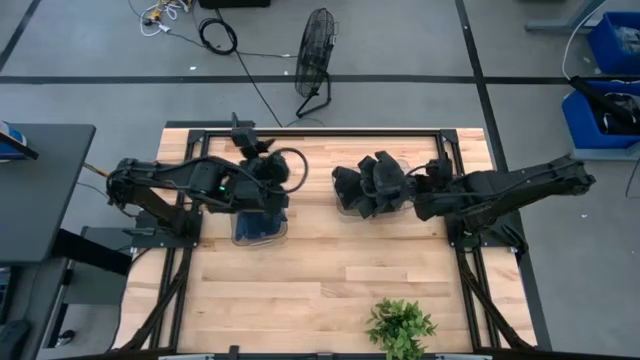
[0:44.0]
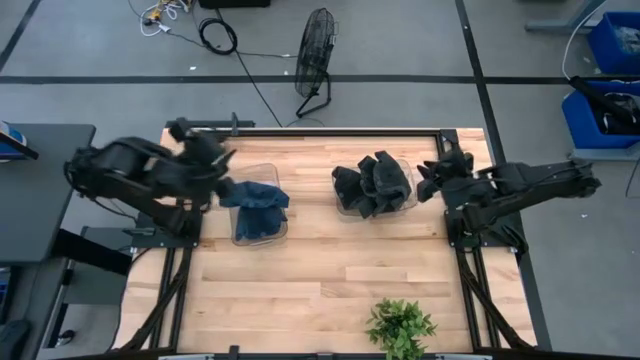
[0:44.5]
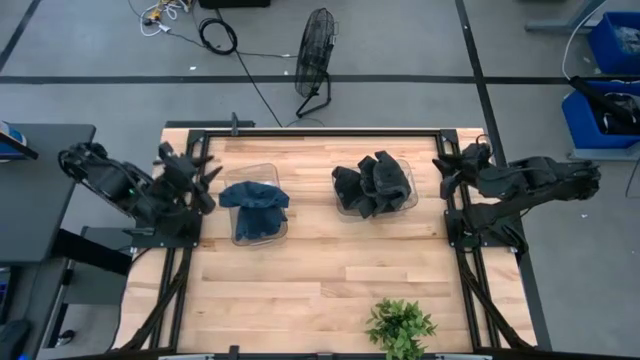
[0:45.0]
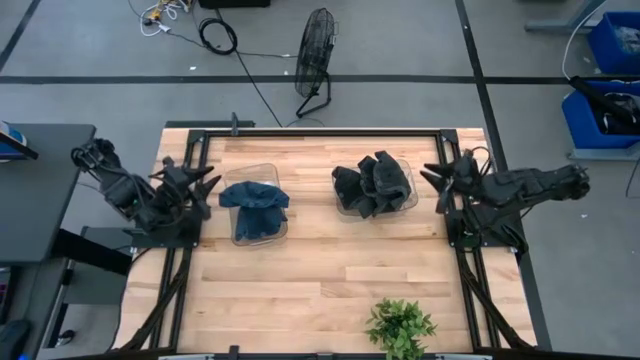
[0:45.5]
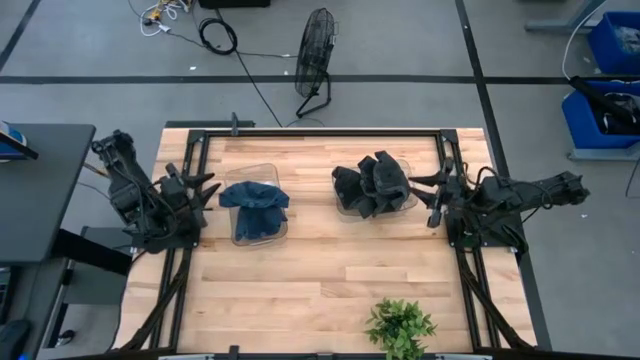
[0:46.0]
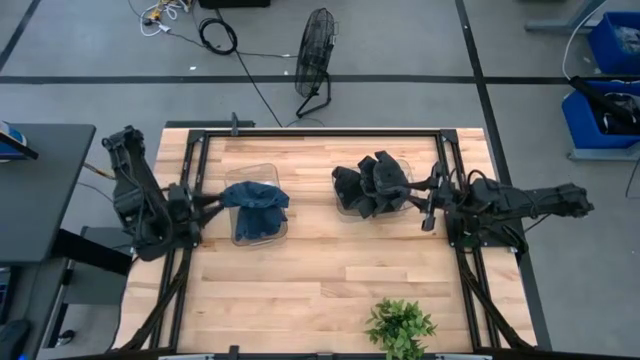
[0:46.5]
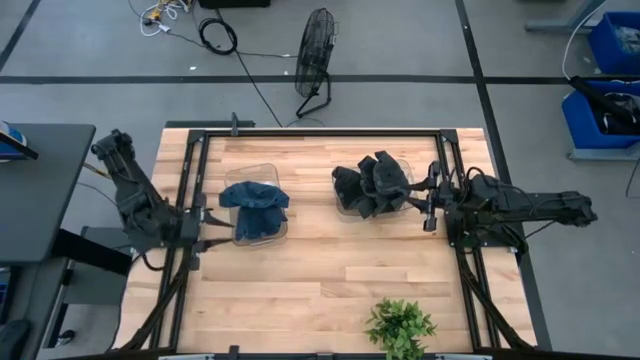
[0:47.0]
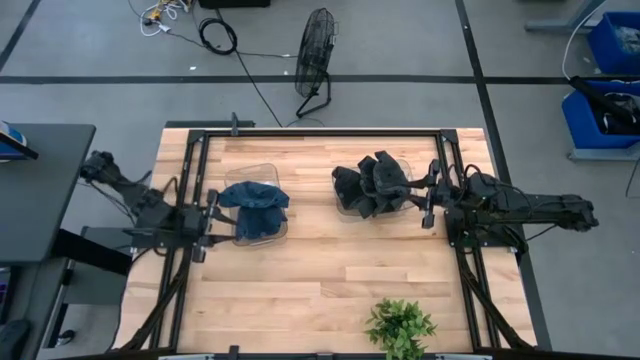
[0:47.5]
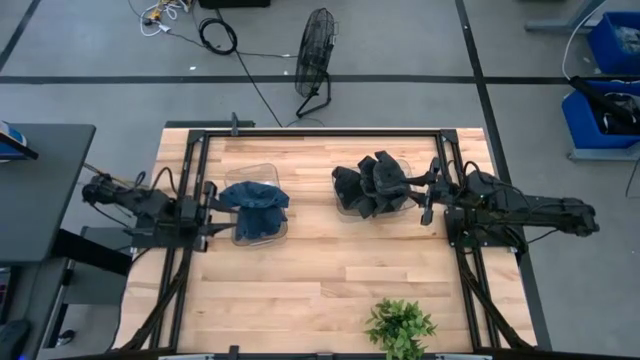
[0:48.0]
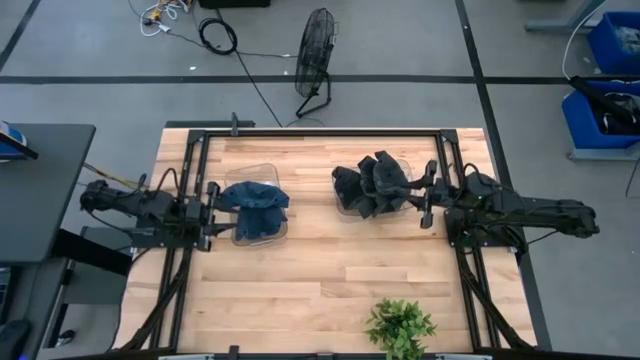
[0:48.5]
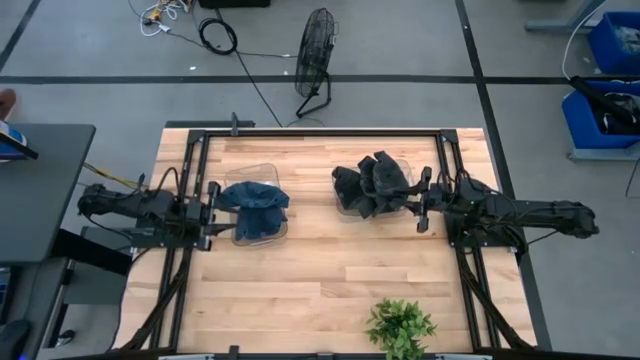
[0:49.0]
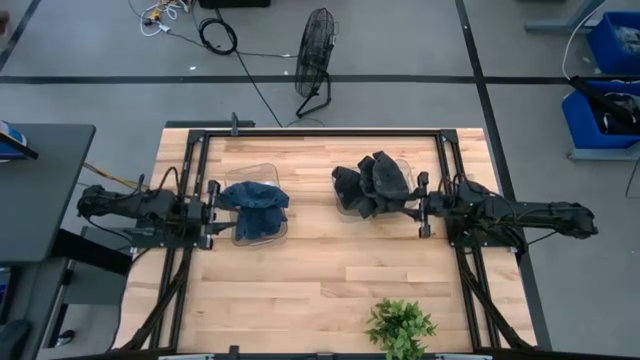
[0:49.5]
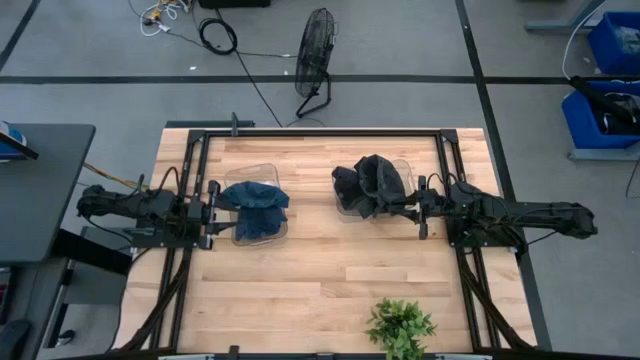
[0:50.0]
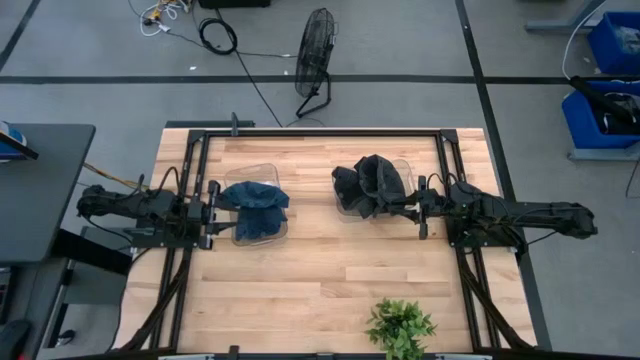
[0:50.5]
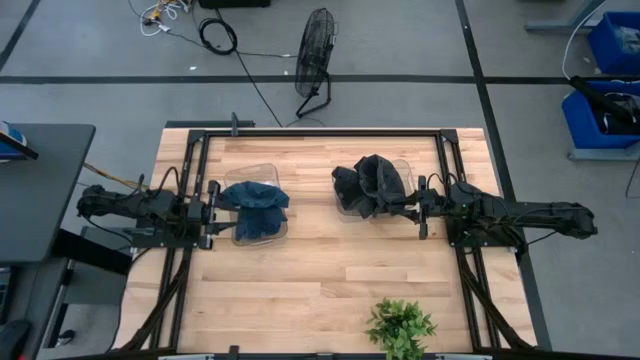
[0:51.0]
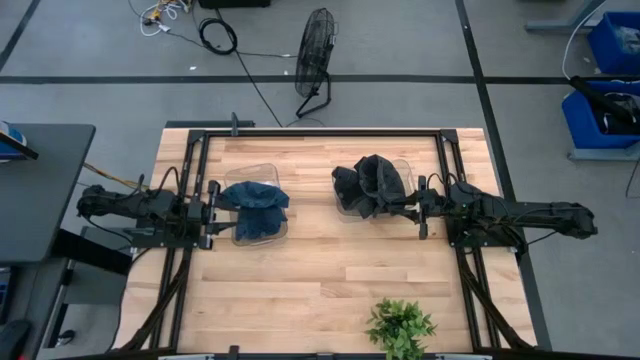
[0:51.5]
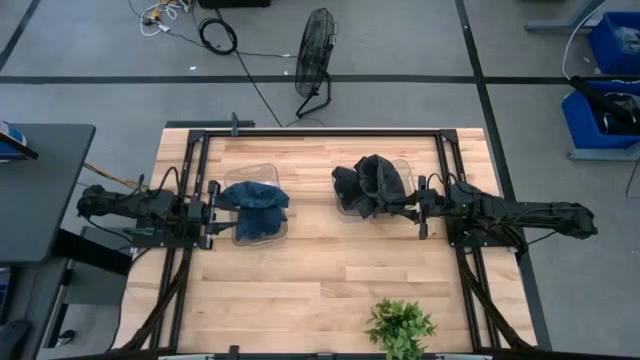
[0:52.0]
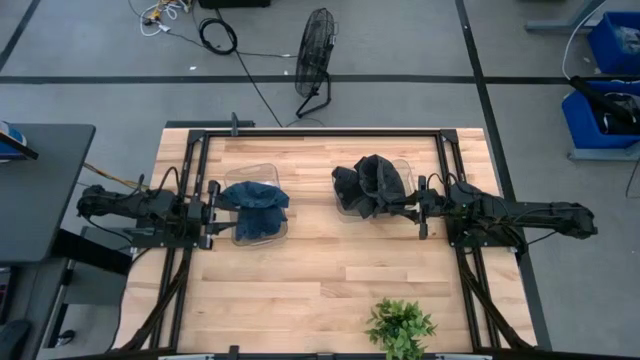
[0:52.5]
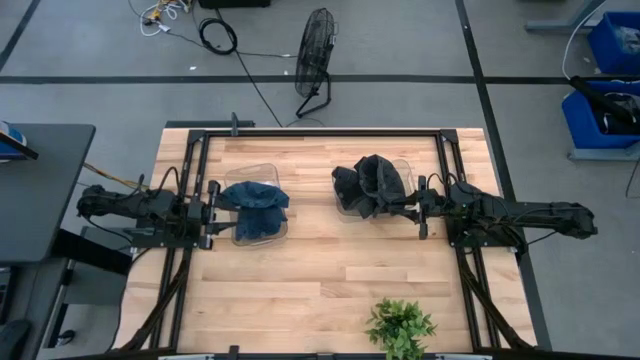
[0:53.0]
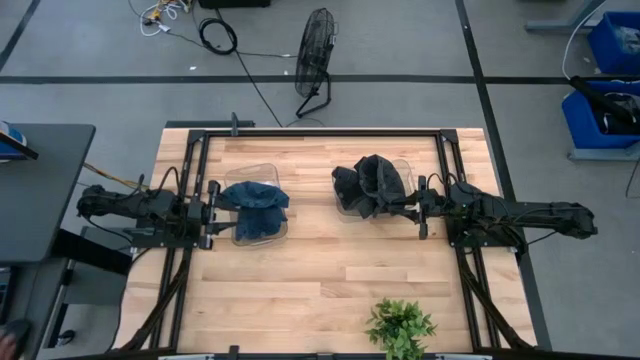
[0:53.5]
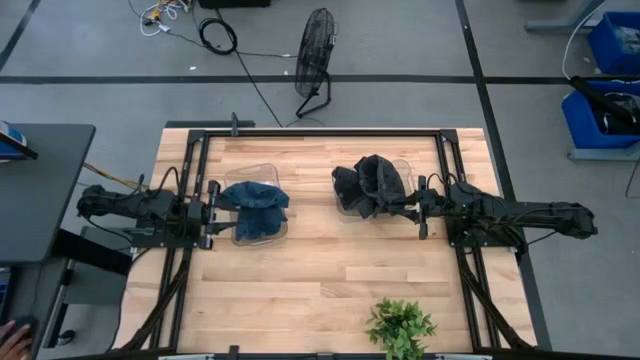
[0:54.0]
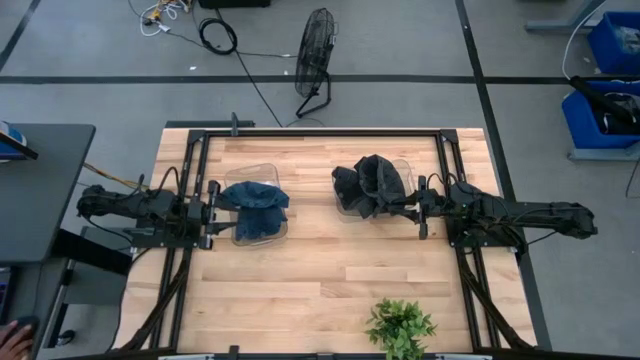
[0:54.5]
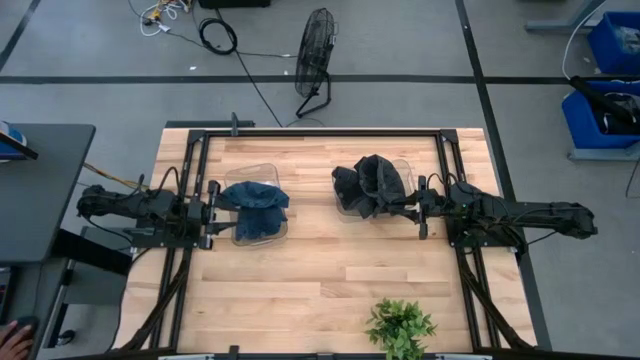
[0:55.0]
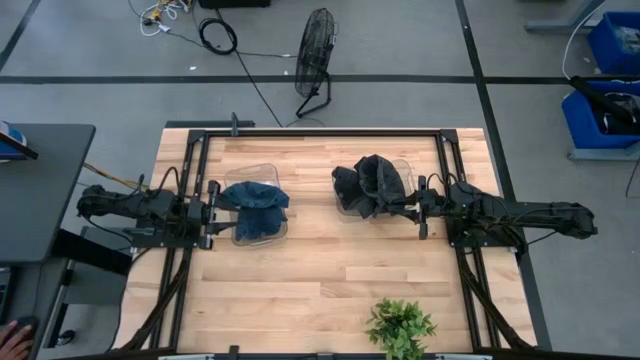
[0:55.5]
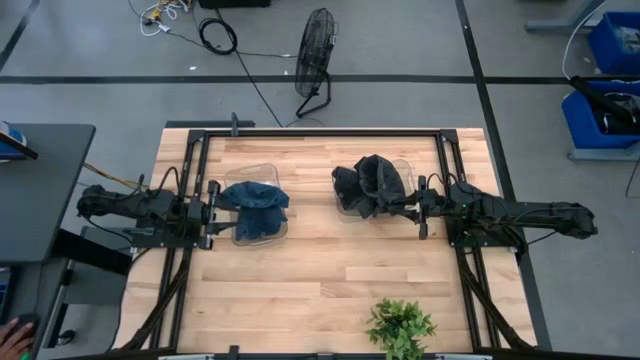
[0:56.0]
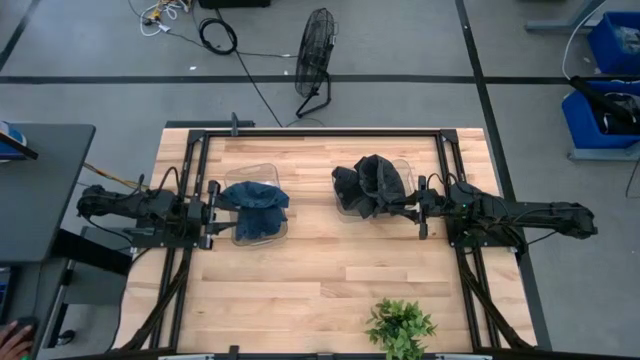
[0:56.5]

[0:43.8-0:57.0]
Task: Pick & Place hat
Return to Home Position

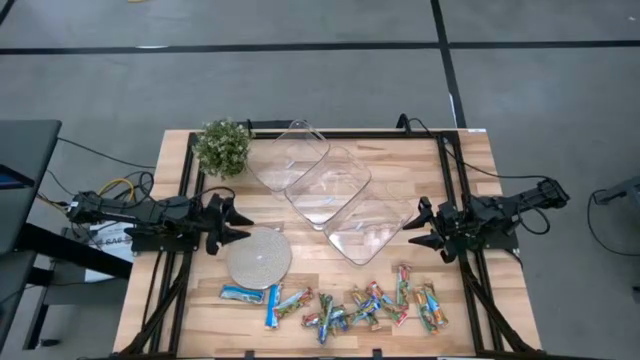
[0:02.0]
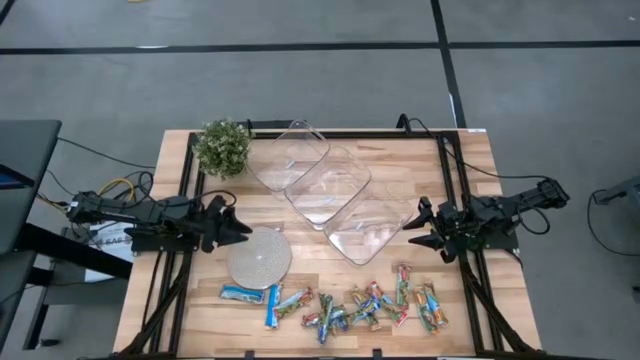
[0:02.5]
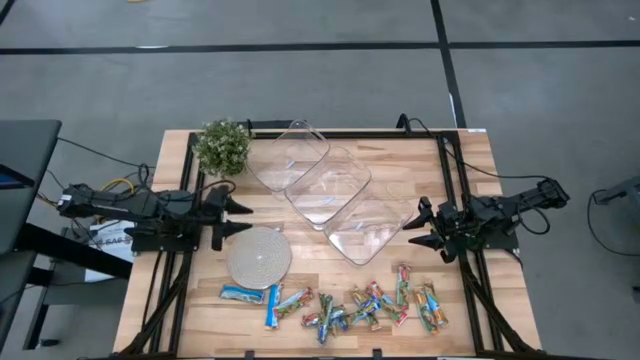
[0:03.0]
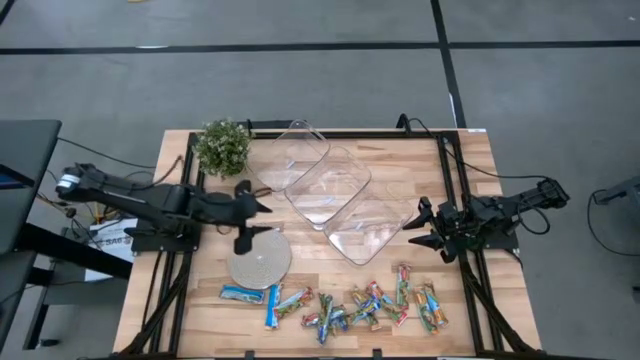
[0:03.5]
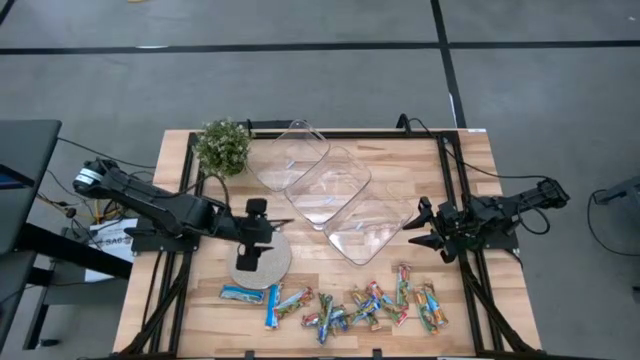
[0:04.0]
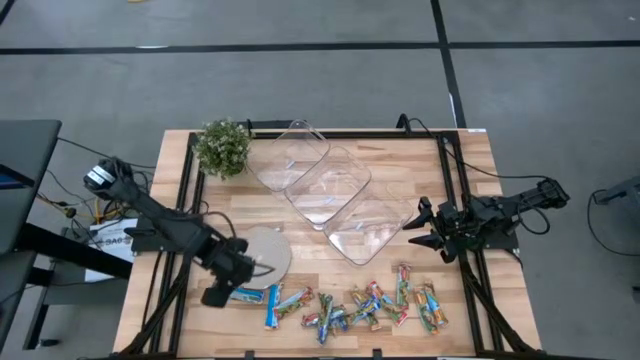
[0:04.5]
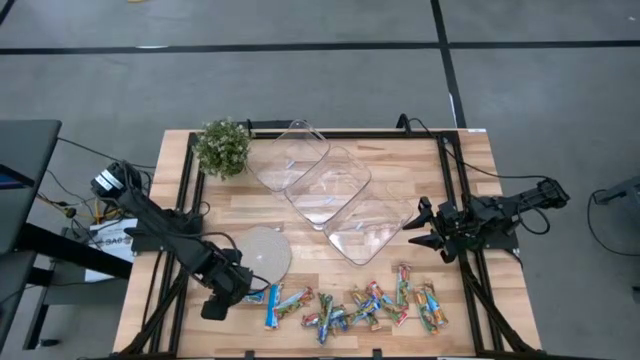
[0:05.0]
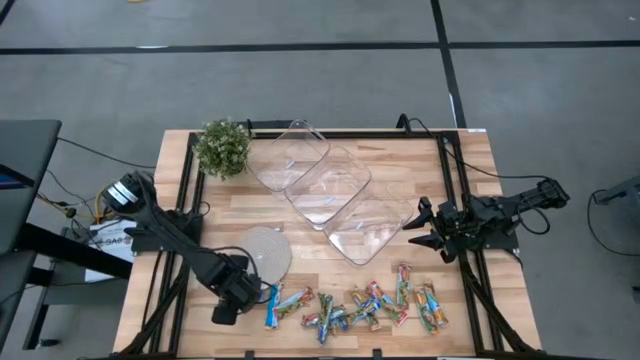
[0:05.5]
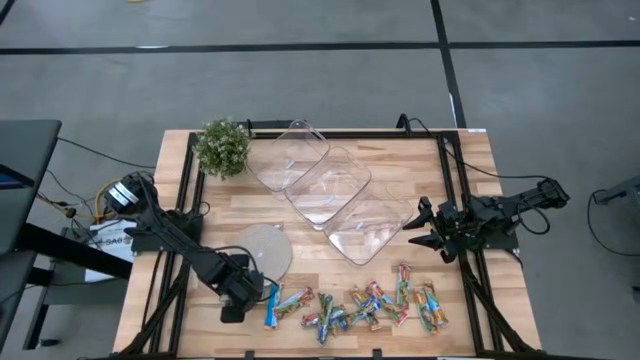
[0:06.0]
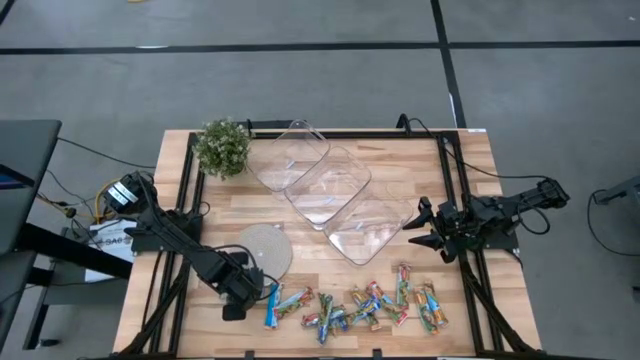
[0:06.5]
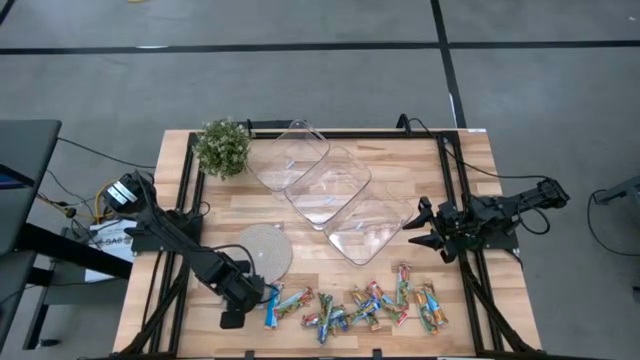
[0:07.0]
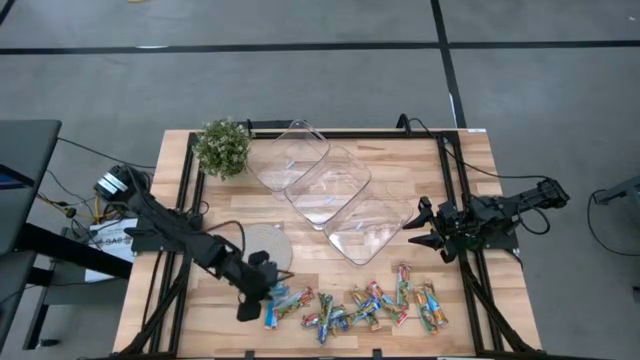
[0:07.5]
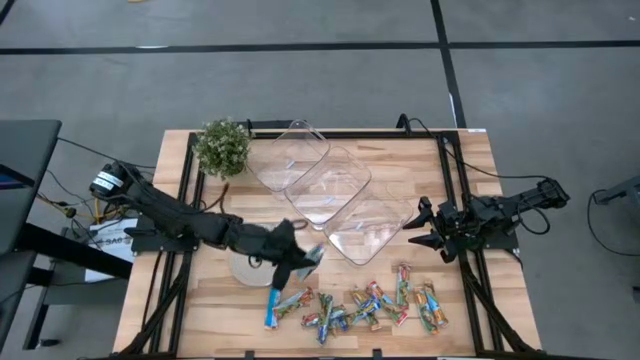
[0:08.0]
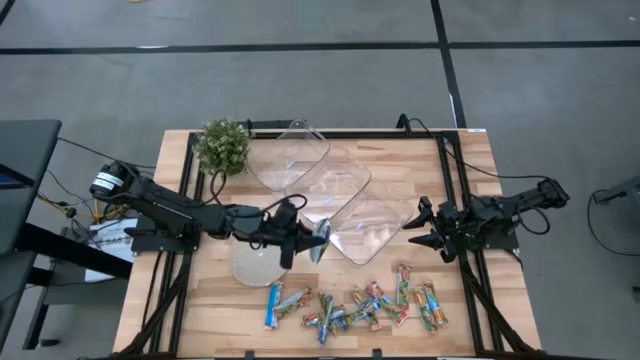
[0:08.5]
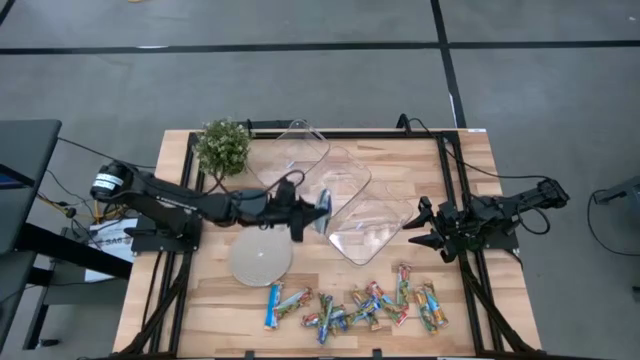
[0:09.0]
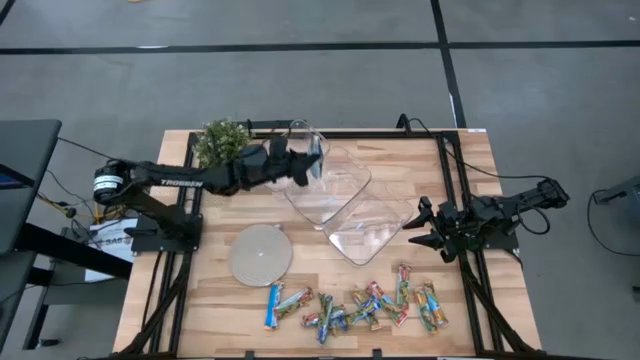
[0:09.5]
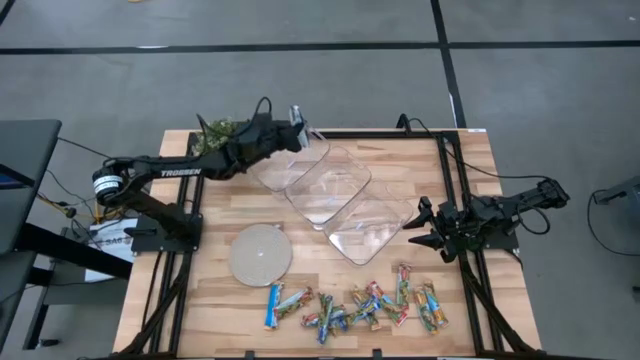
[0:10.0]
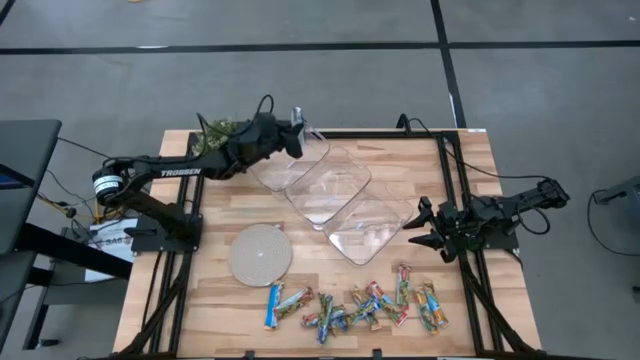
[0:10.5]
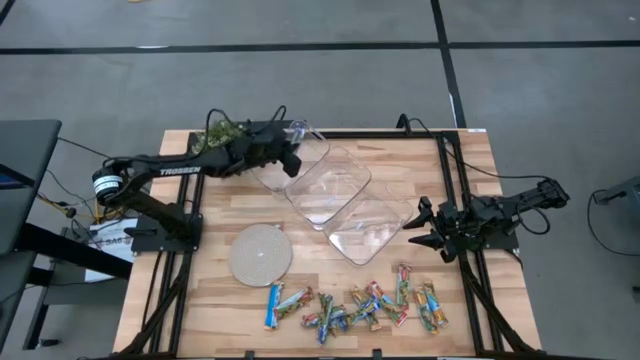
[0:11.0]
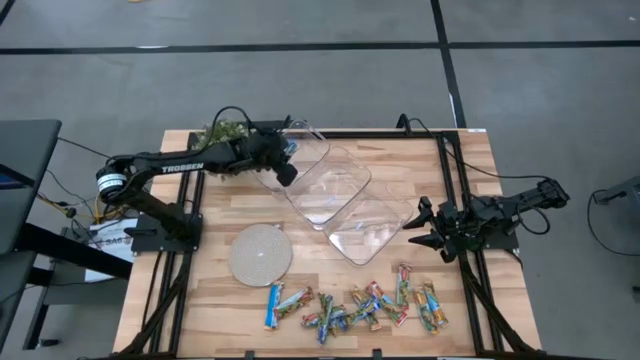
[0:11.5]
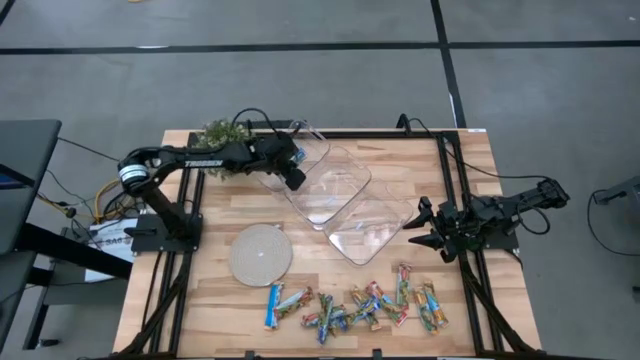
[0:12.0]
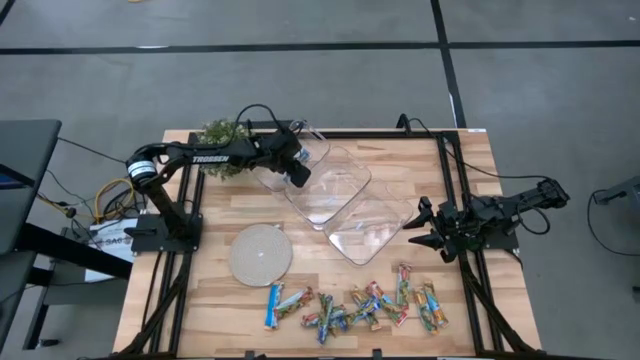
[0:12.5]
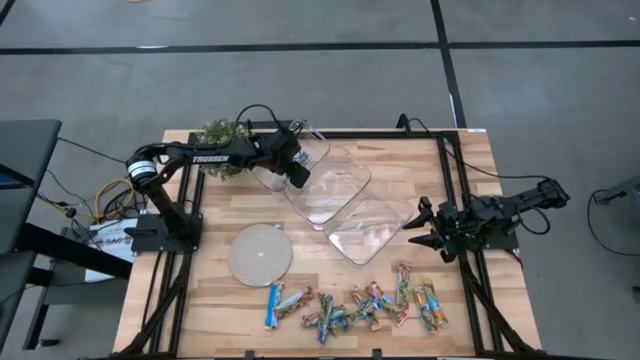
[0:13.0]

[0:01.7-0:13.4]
Task: Pick and place Granola Bars by type
Put the blue granola bar into the top transparent bin
